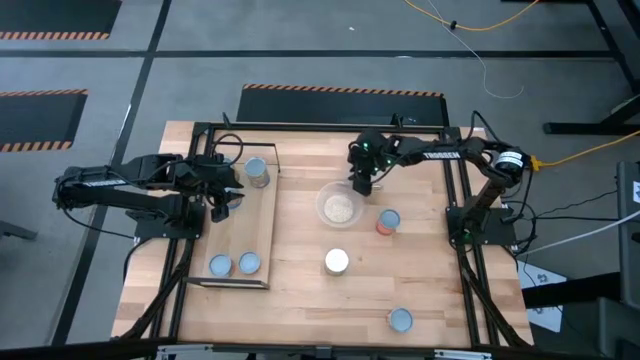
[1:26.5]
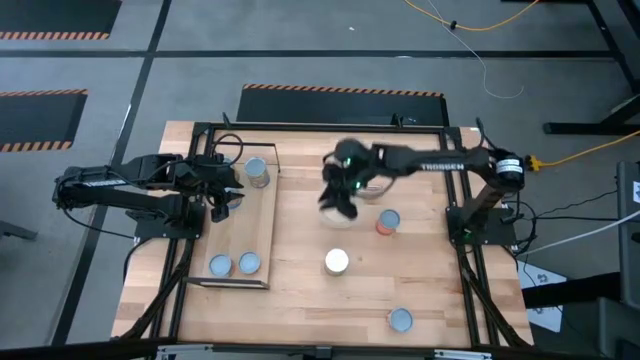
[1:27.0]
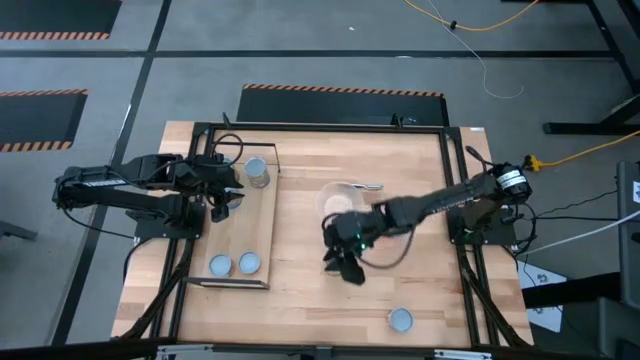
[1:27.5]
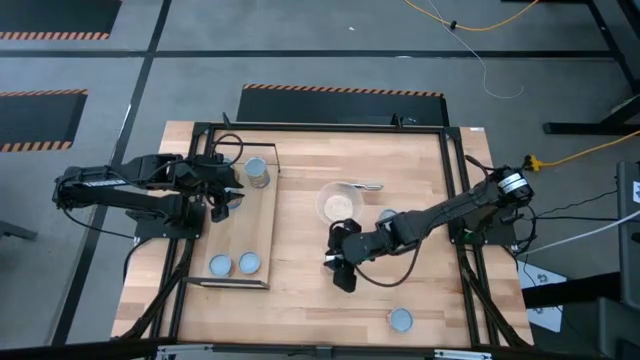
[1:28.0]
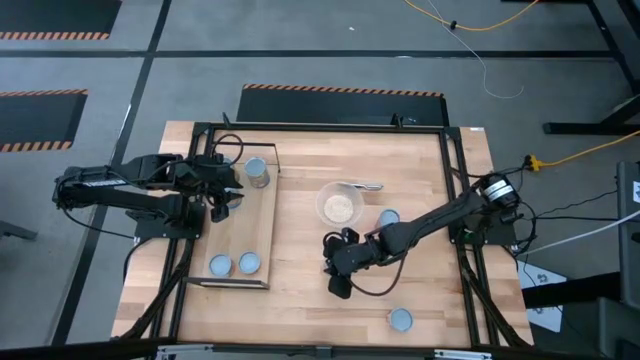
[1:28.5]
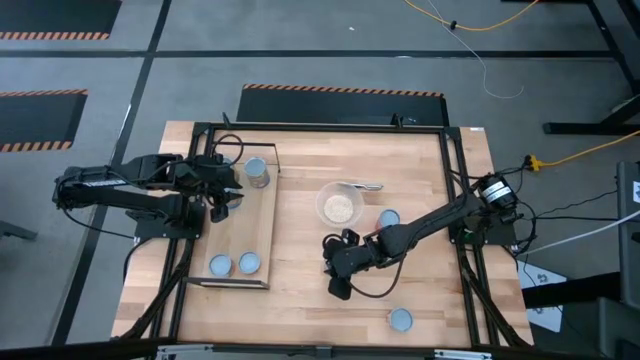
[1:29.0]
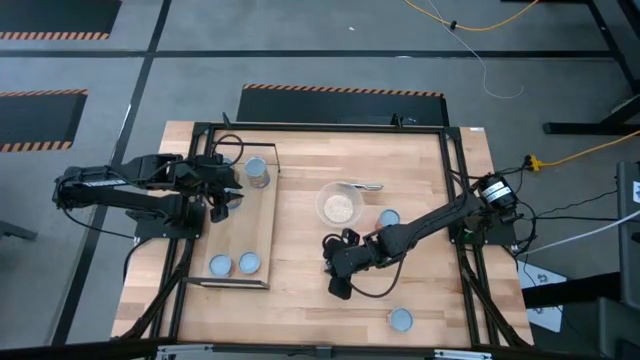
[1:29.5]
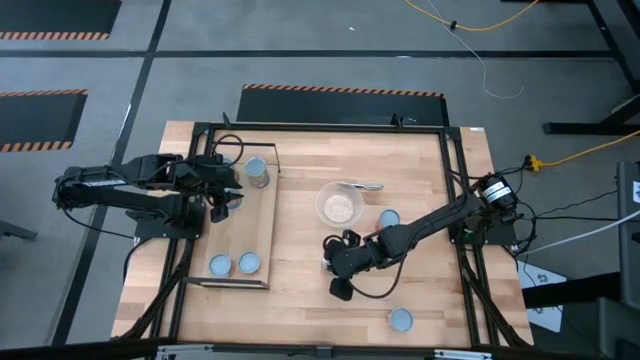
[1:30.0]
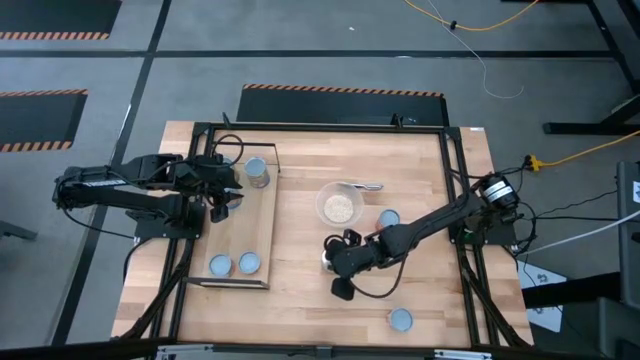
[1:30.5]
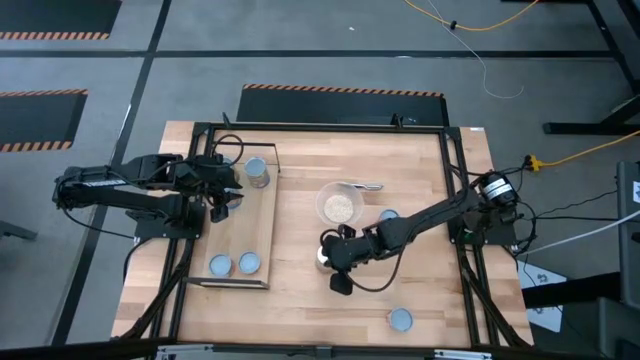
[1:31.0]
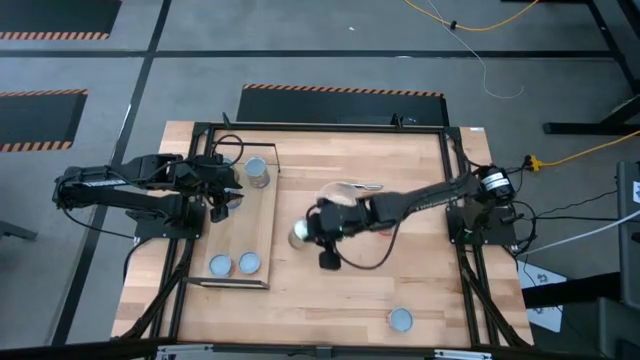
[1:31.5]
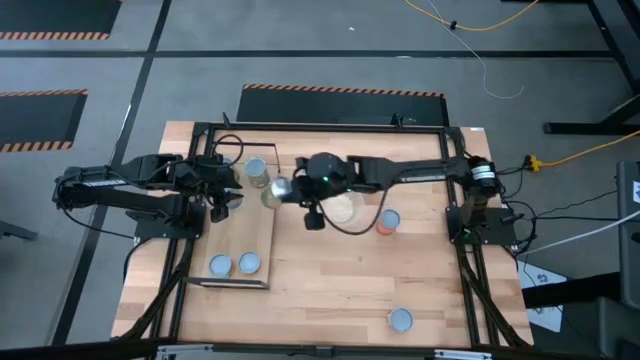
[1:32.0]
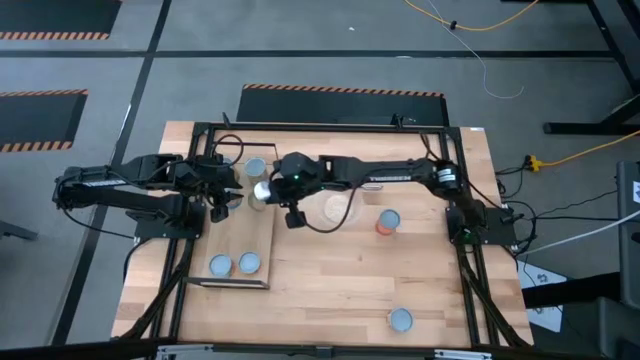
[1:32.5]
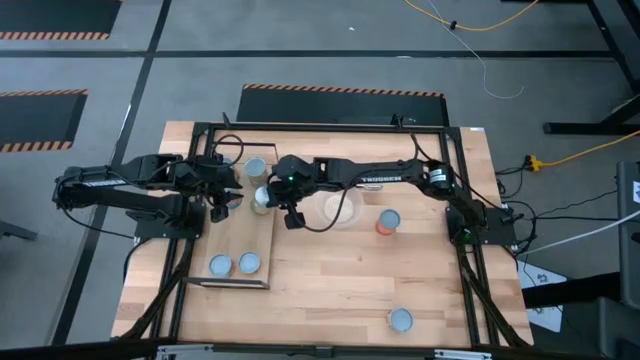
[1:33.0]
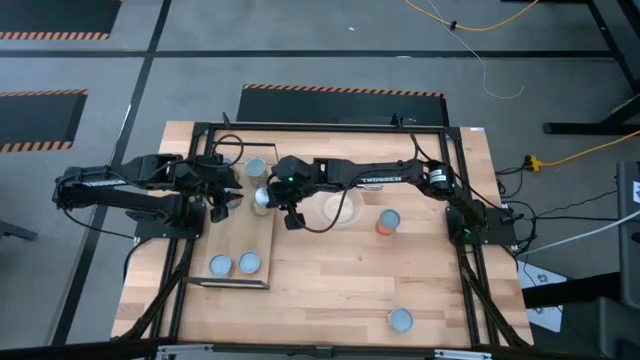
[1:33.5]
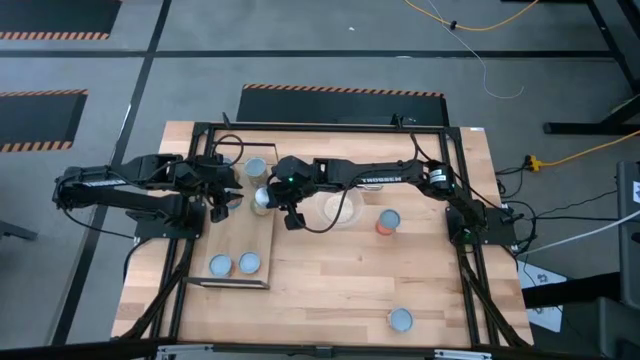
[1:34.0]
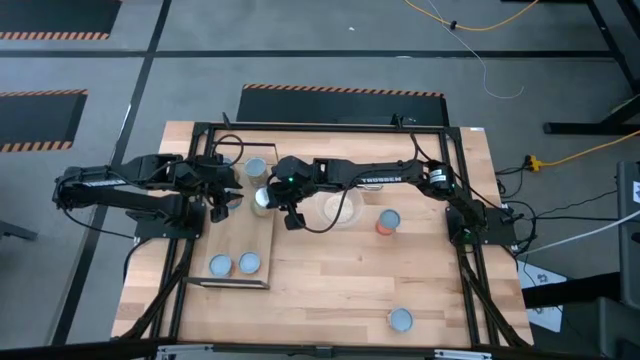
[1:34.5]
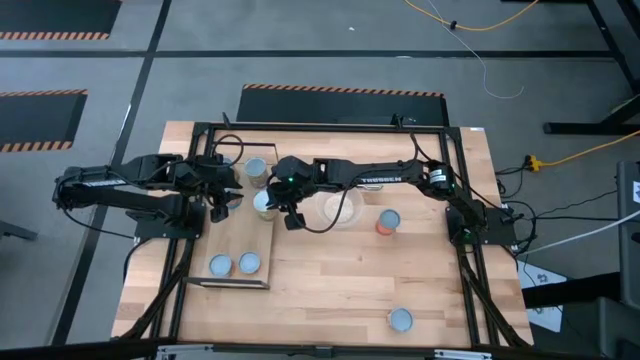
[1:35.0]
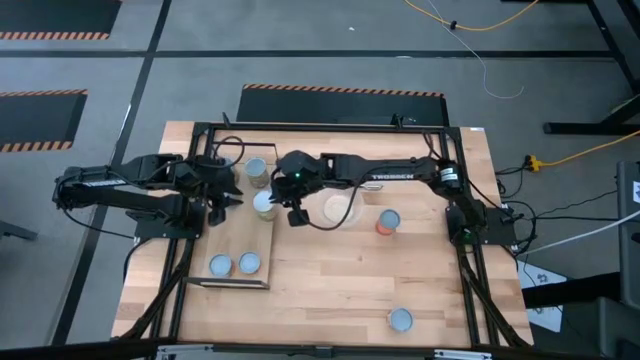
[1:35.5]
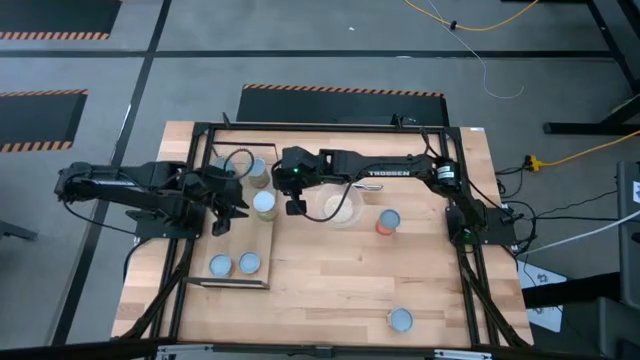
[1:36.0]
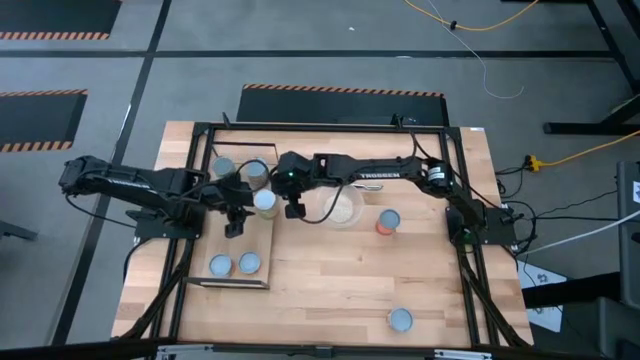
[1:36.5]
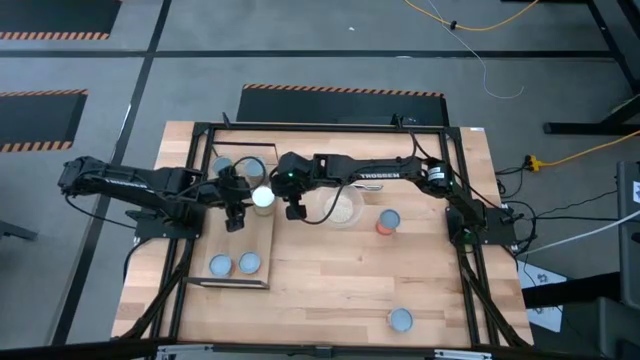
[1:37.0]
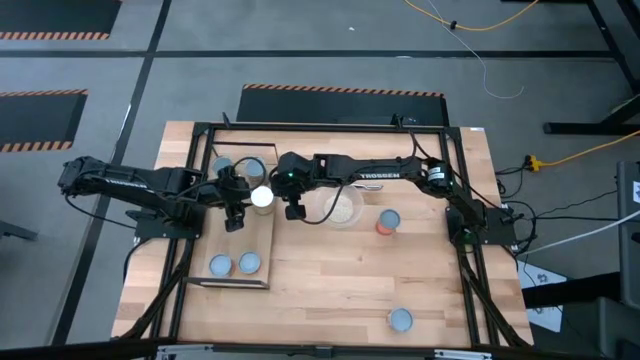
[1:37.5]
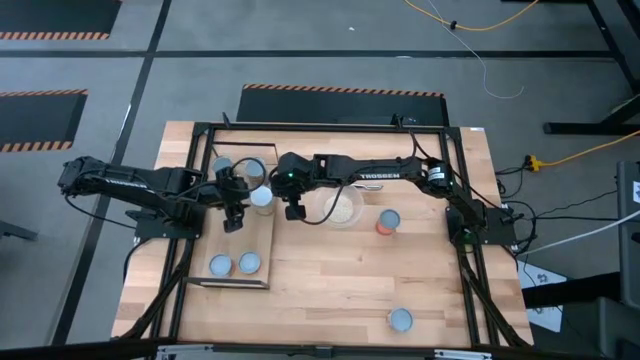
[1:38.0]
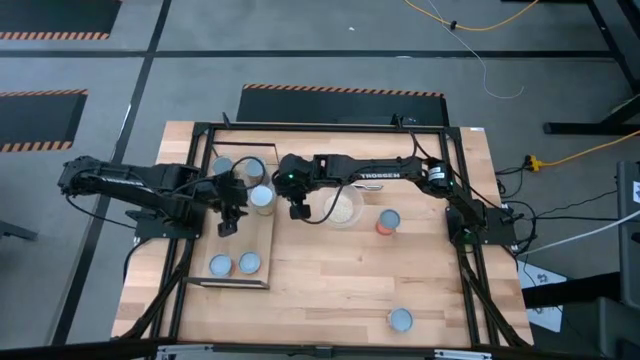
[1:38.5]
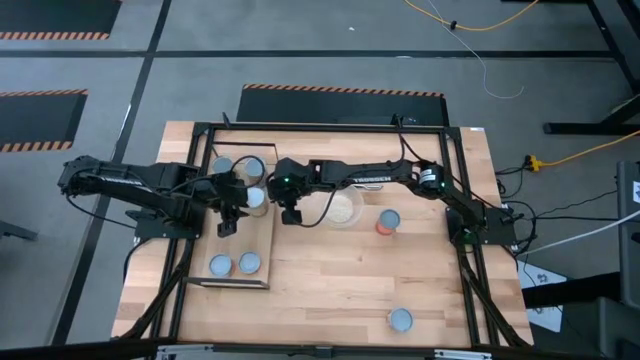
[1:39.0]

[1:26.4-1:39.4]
Task: Pick and place cans onto a shelf
Put the canned oranges on the shelf

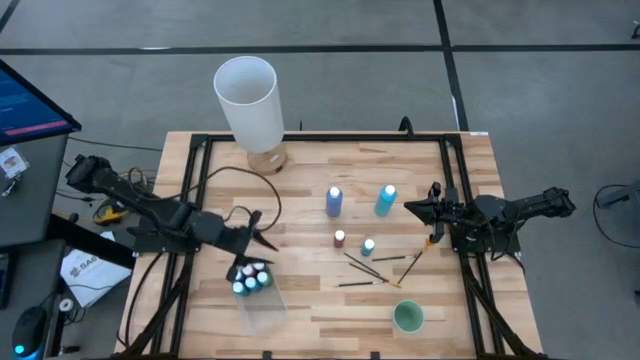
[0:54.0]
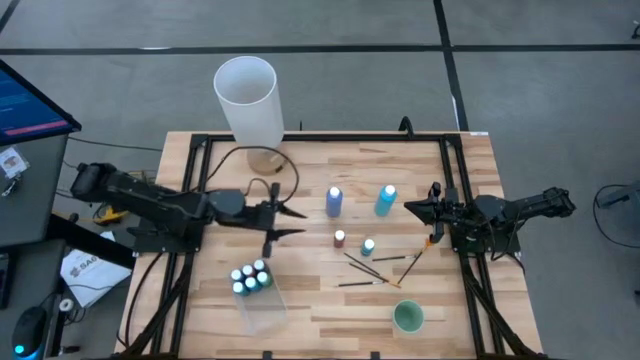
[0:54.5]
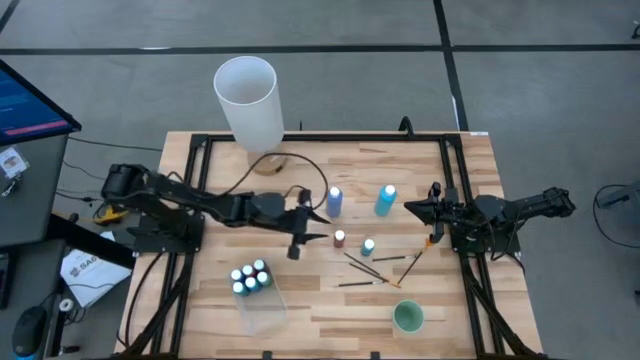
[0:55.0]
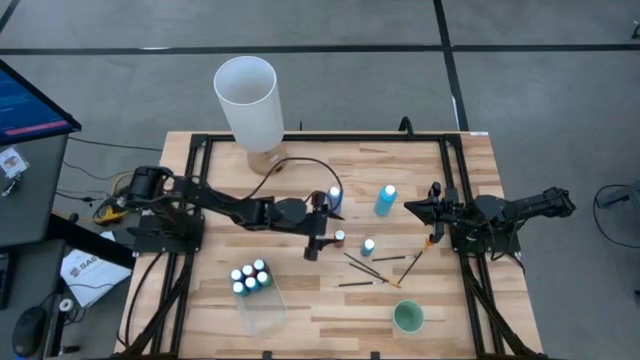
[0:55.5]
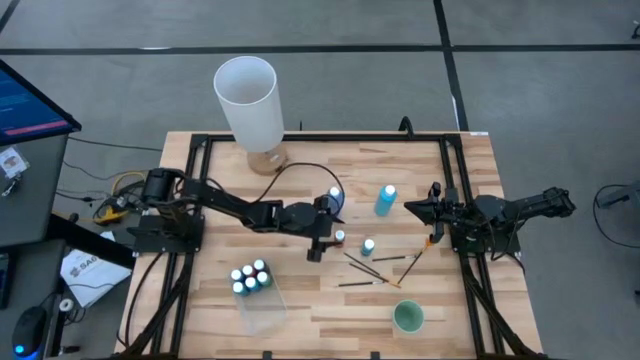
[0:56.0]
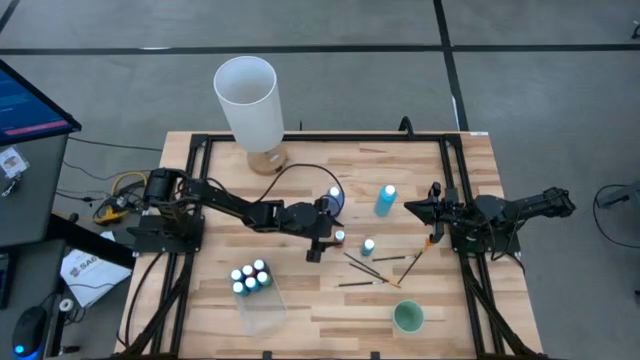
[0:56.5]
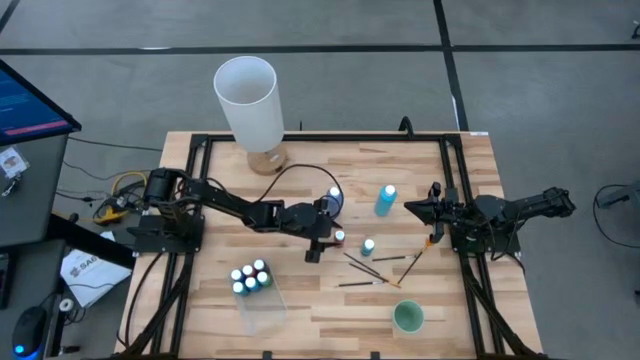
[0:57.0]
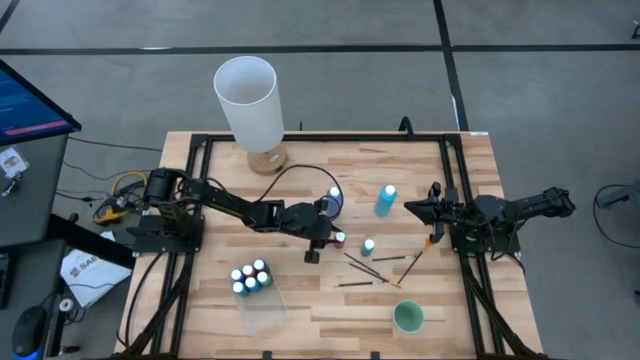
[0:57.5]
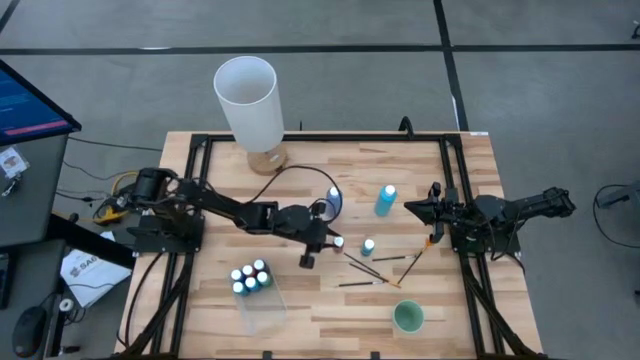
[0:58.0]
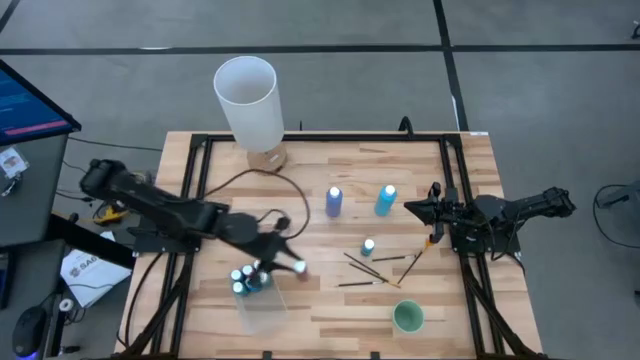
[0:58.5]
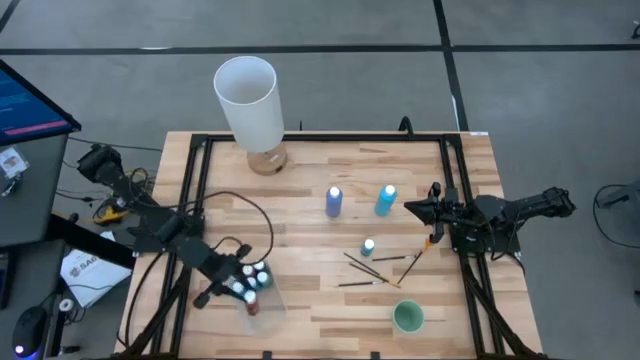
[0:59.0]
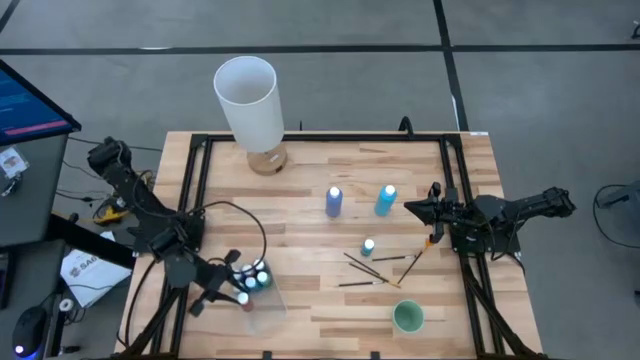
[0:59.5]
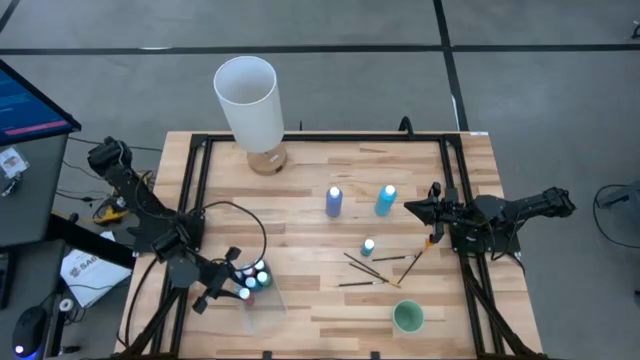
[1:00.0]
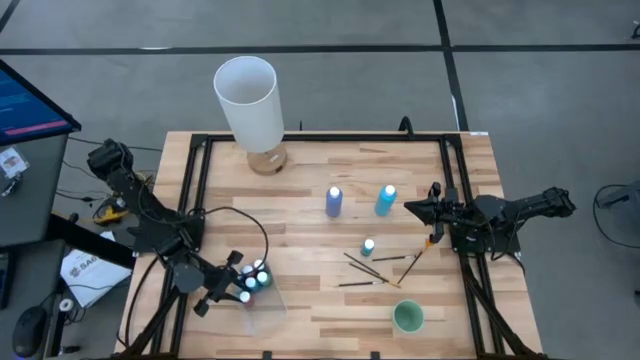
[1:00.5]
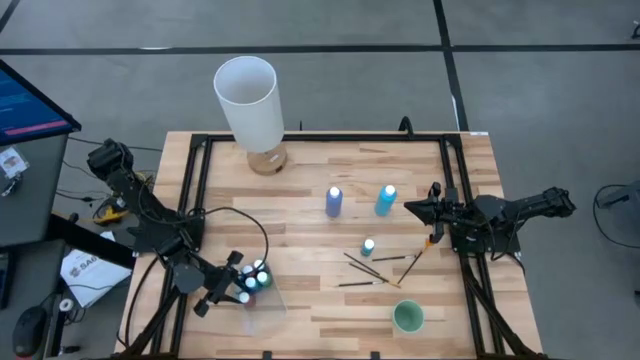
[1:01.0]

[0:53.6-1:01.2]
Task: Pick & Place Paint Supplies
Put the red paint bottle into the transparent bin
